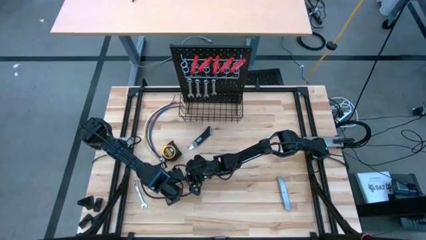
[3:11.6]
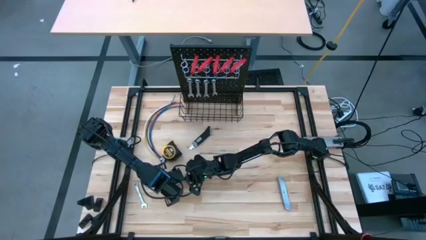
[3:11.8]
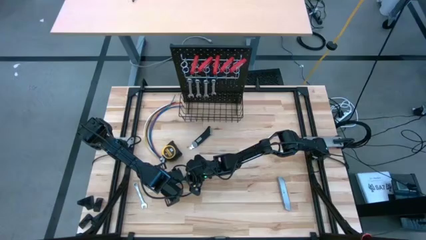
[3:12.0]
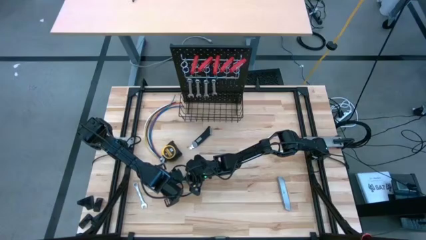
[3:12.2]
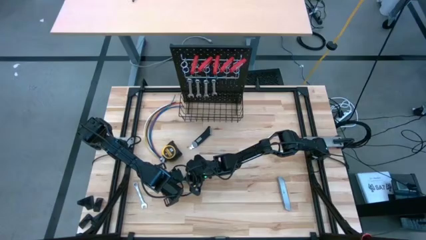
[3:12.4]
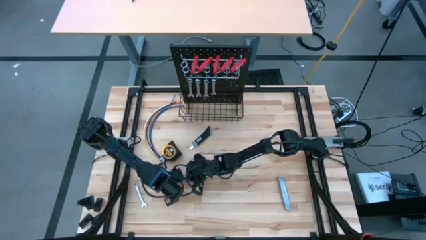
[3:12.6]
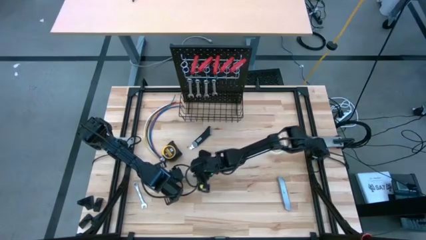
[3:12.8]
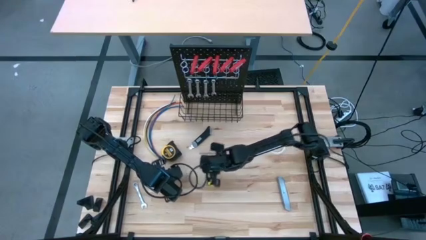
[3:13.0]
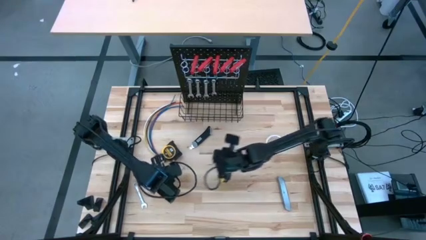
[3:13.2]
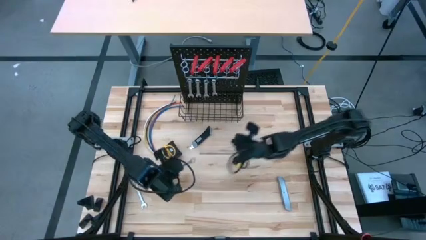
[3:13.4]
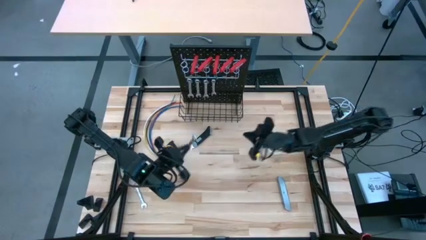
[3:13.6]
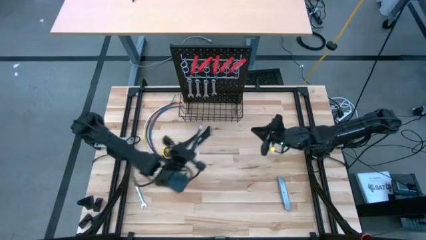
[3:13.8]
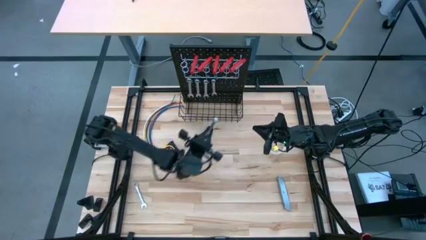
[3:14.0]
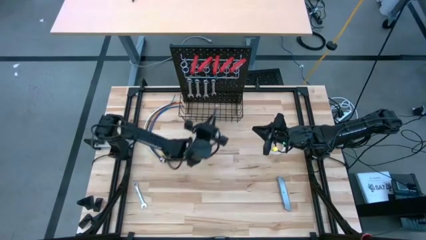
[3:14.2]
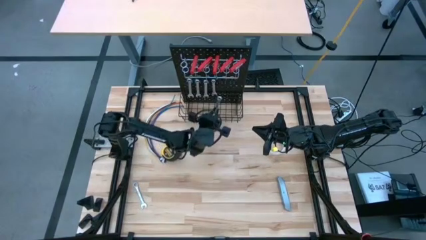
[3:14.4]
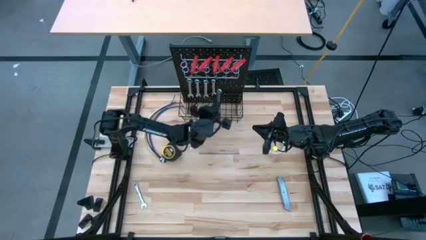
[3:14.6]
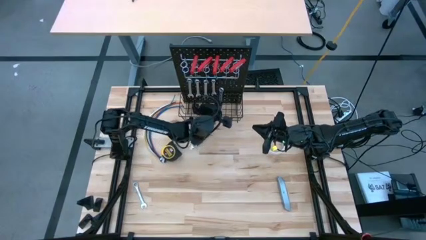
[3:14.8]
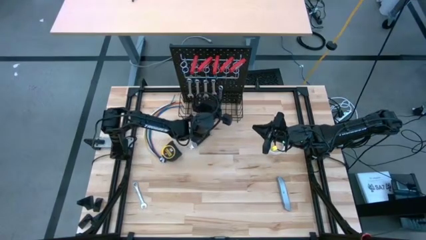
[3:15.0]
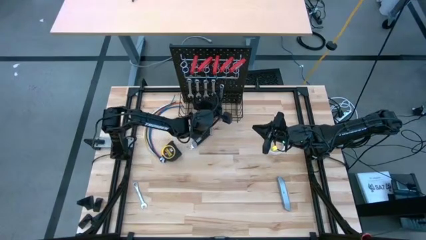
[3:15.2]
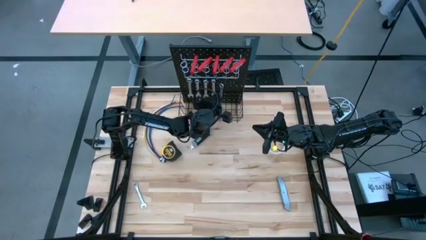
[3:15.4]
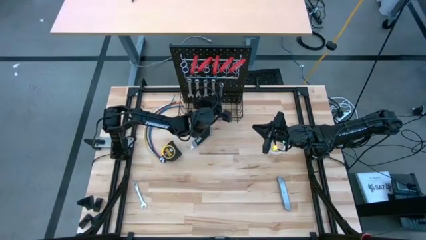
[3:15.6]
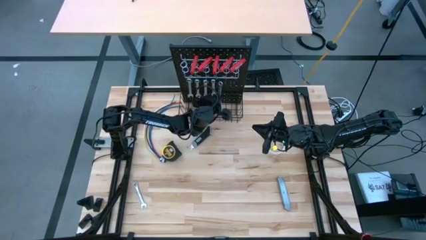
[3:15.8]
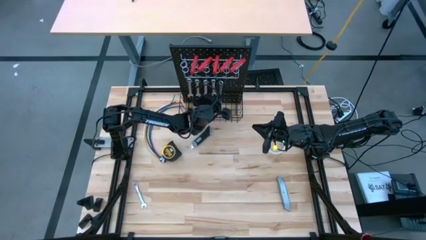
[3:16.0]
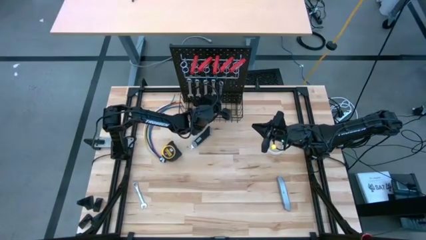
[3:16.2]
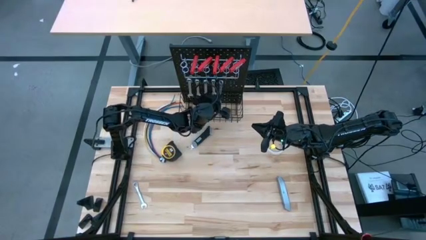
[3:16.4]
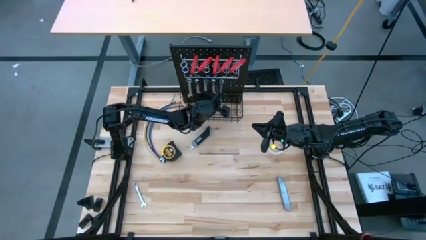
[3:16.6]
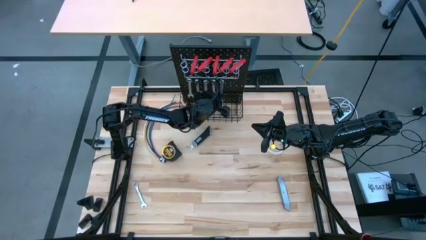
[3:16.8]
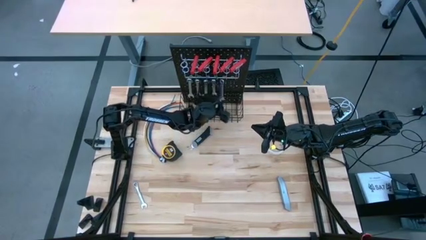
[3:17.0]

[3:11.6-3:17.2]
Task: Hang tools onto peg board
Hang the right wrench on the peg board

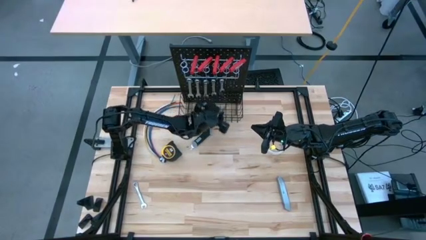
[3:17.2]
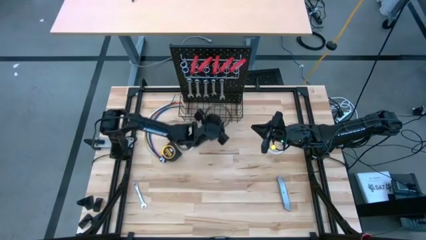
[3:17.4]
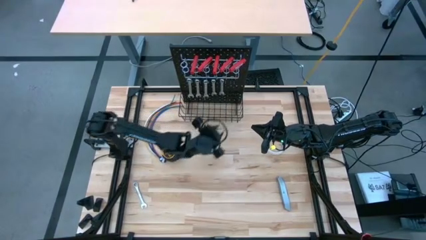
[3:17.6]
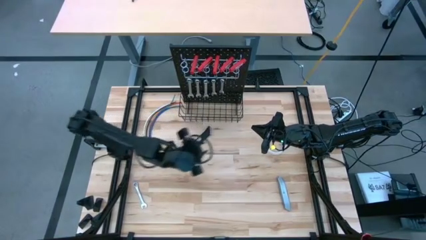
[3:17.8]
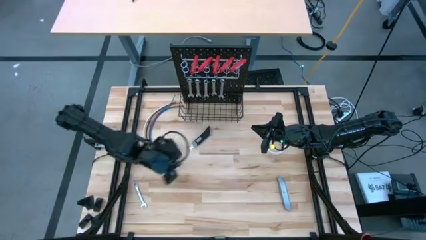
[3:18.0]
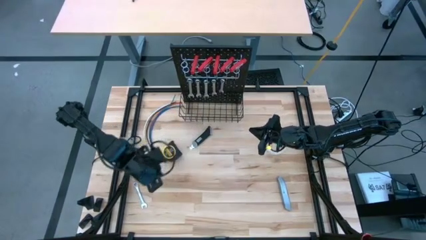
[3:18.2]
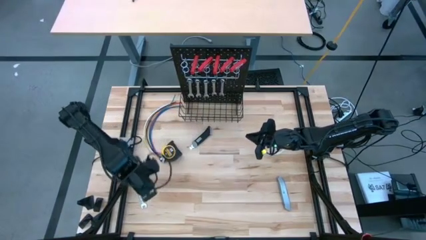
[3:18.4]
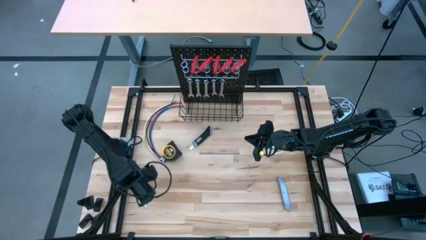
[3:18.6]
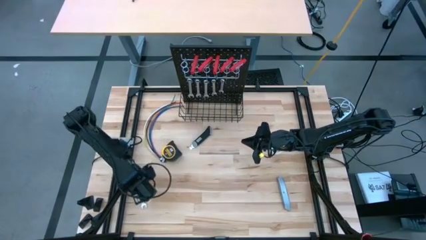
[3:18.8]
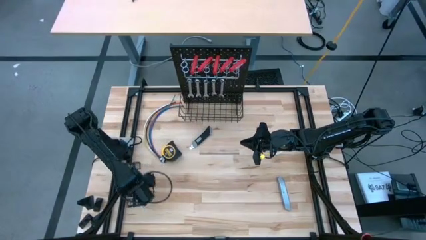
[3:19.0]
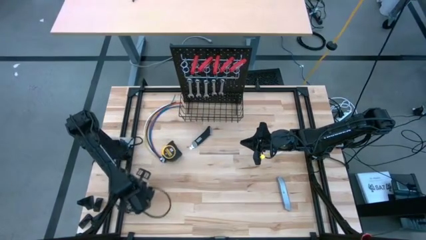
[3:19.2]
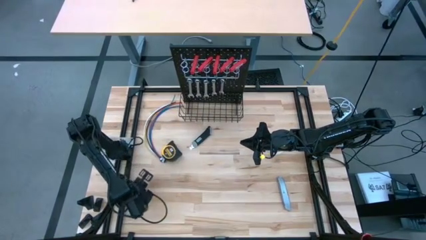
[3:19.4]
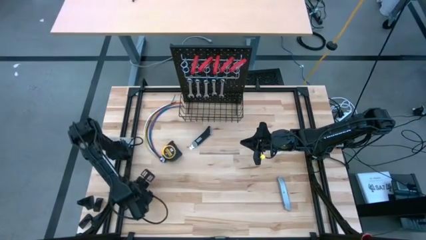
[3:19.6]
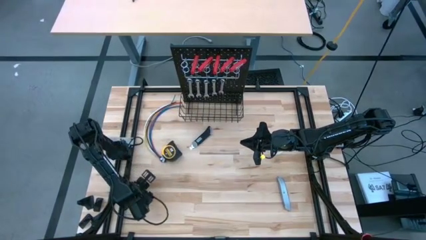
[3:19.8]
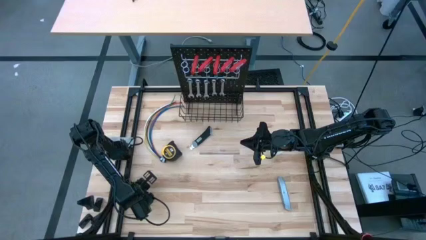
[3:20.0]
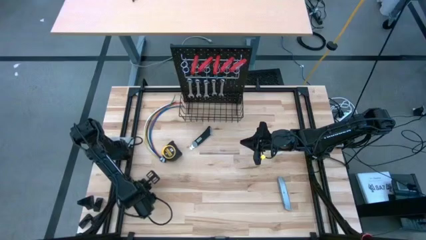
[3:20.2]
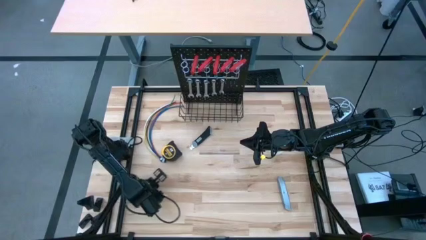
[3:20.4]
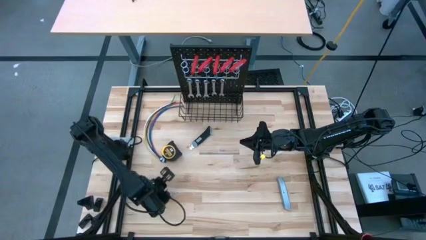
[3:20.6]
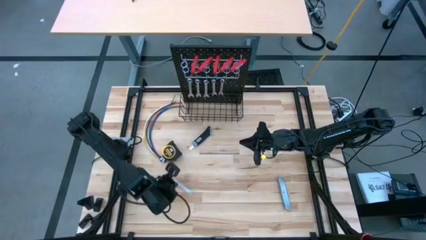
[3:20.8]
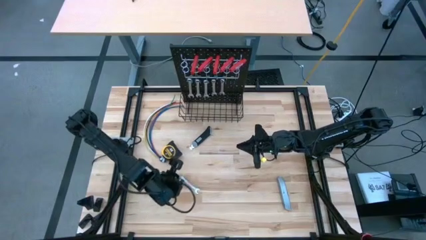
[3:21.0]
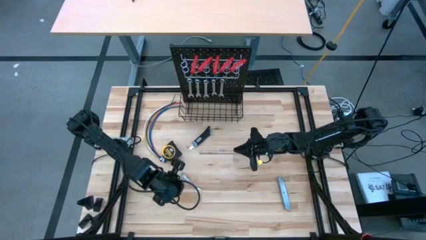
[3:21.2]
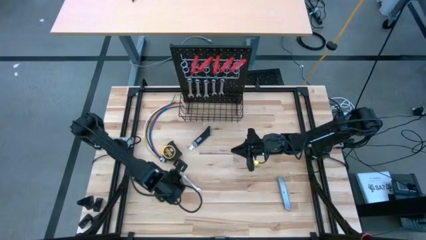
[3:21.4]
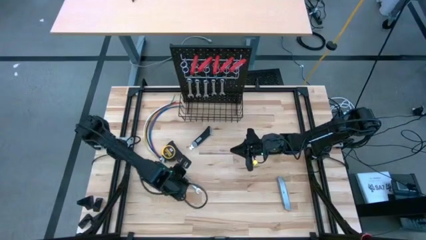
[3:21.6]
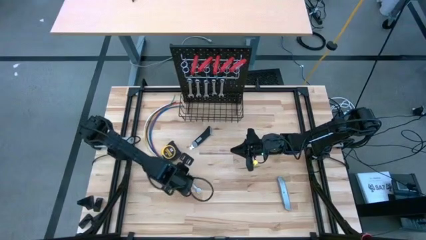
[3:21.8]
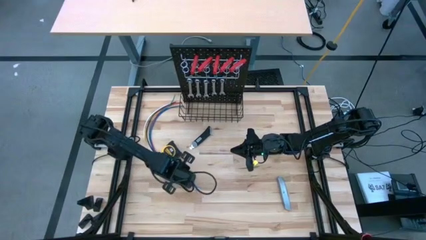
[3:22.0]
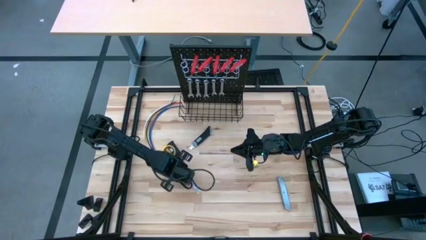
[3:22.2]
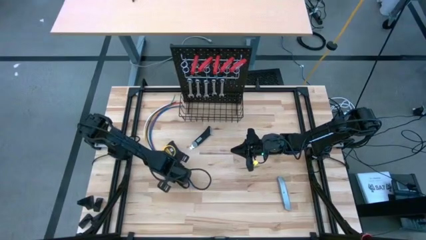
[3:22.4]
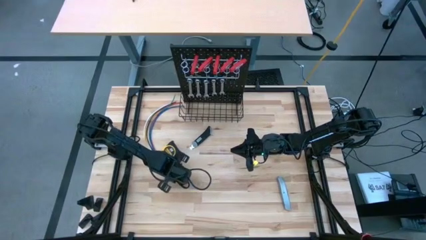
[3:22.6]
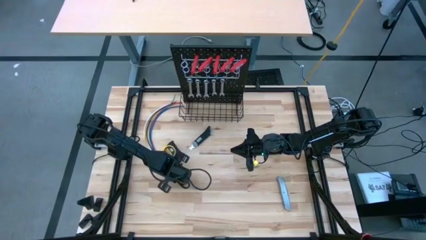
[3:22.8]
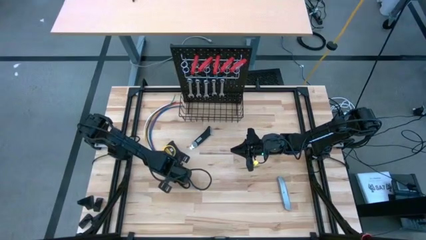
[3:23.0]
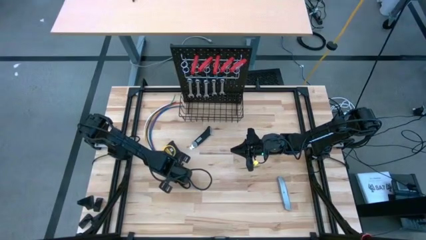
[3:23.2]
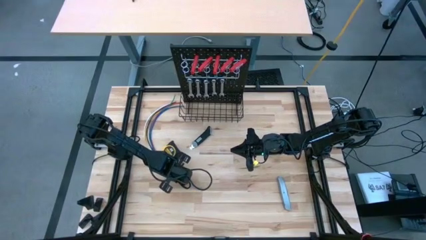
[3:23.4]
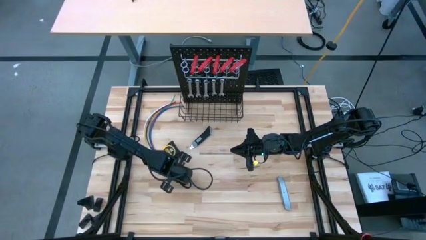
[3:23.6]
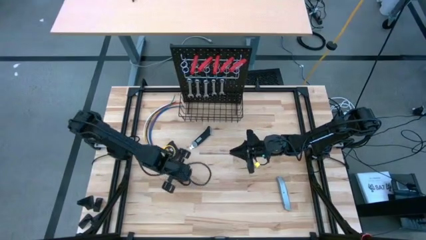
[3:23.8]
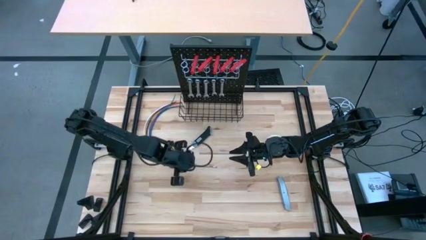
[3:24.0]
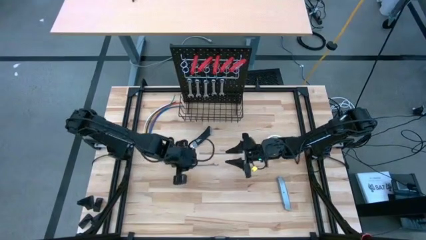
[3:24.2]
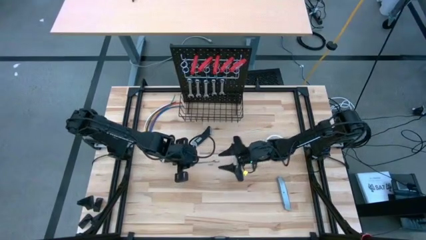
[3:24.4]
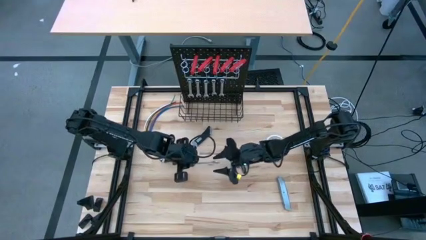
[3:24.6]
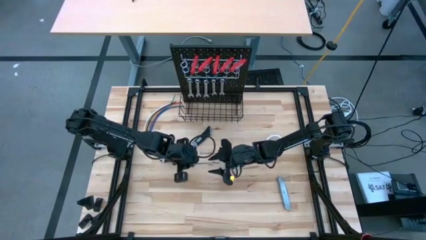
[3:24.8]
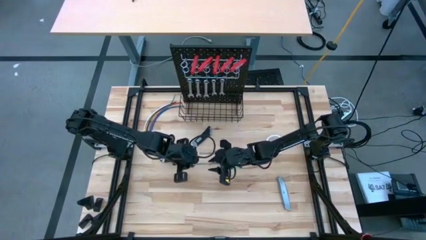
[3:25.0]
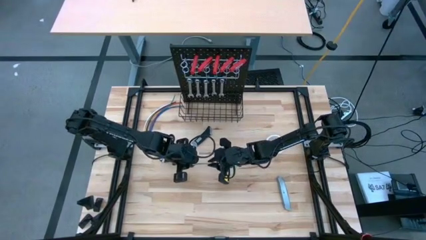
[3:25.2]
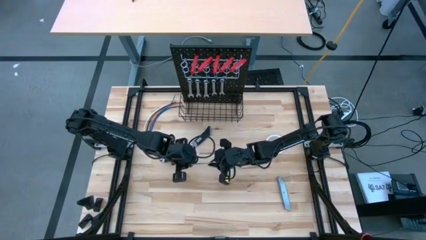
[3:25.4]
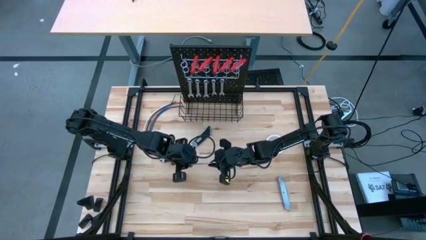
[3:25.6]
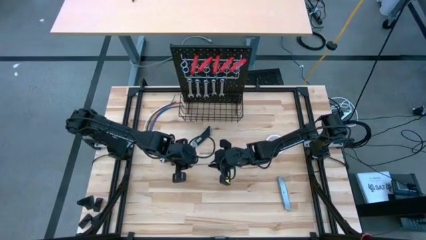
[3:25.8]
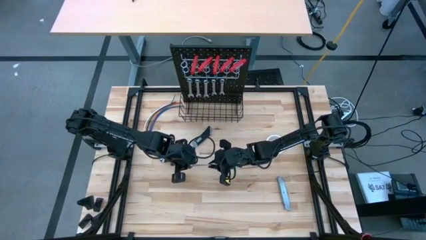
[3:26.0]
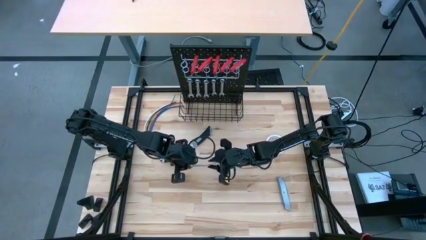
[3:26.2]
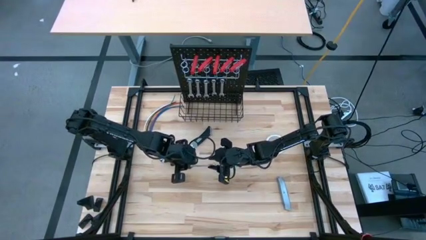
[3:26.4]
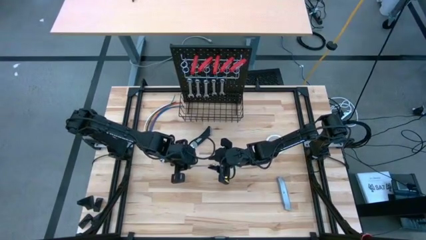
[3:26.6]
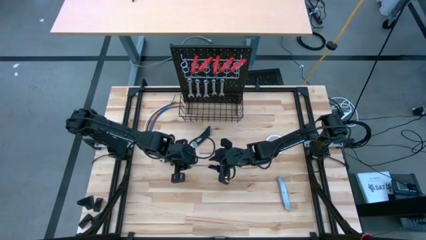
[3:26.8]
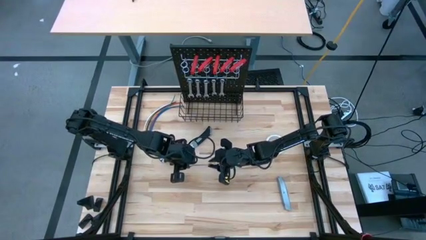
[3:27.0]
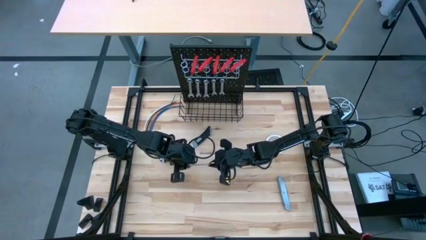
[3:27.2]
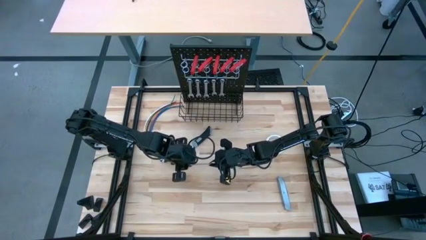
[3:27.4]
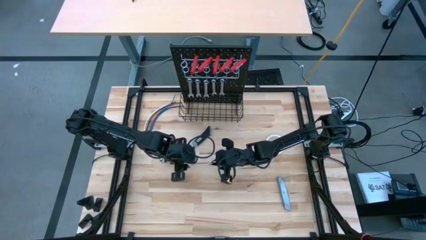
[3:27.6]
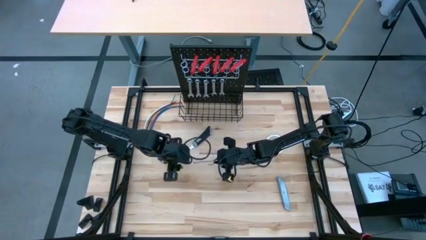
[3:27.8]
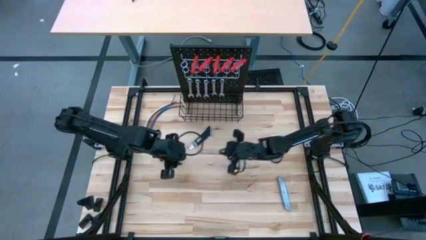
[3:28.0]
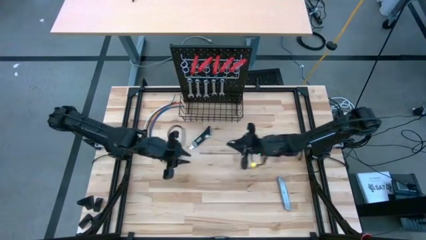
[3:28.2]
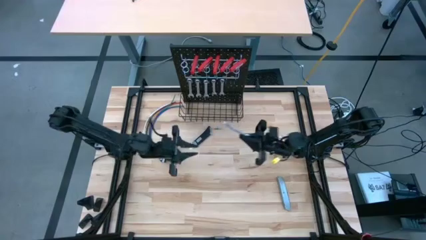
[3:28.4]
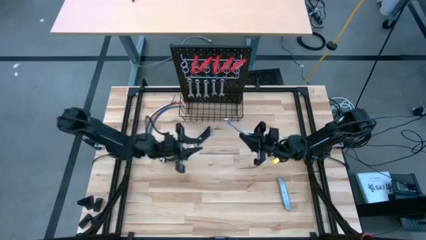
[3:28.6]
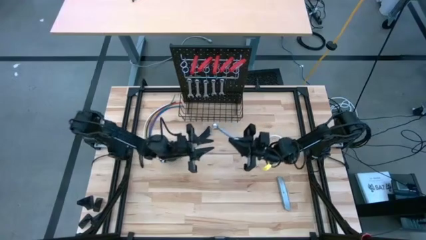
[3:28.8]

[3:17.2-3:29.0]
Hang the wrench on the peg board
